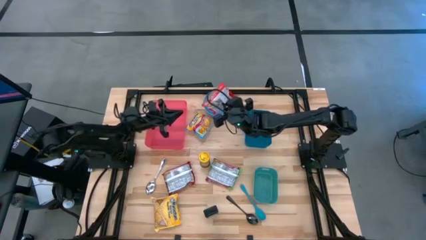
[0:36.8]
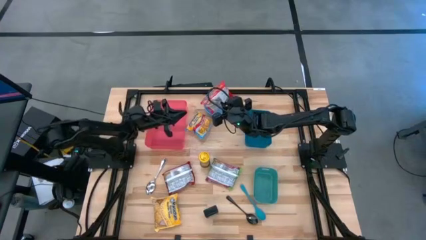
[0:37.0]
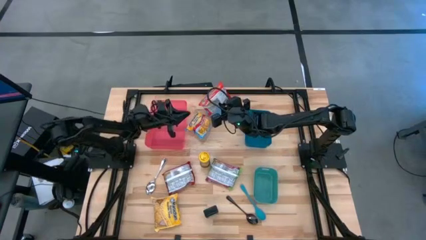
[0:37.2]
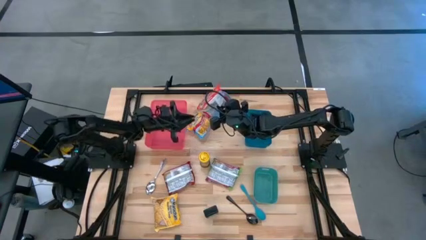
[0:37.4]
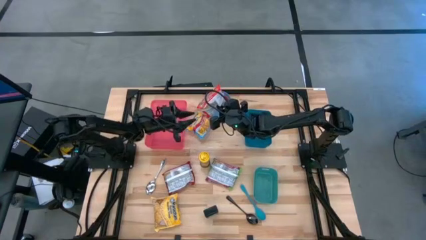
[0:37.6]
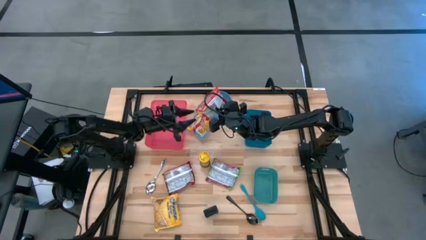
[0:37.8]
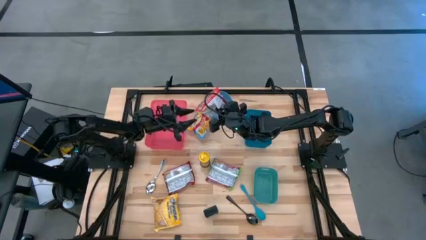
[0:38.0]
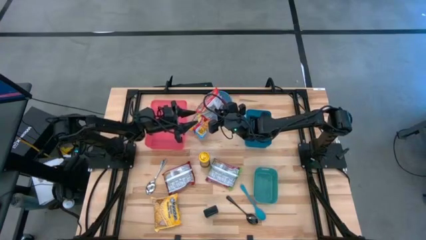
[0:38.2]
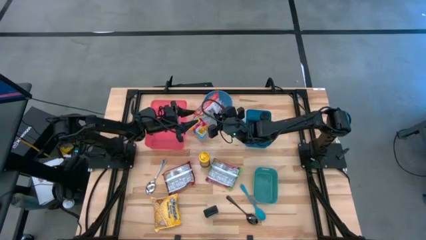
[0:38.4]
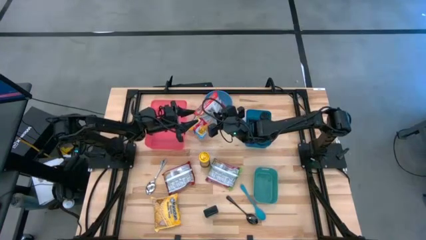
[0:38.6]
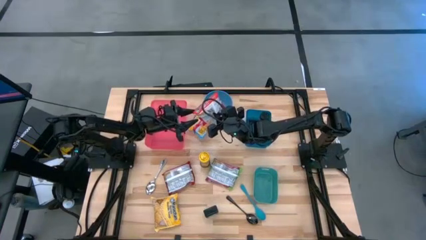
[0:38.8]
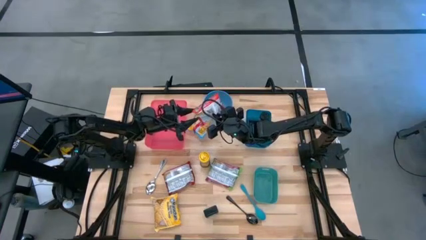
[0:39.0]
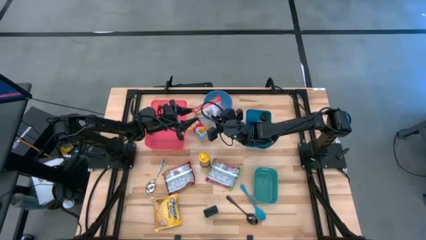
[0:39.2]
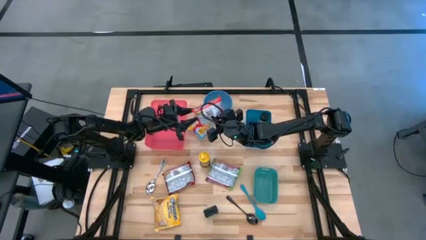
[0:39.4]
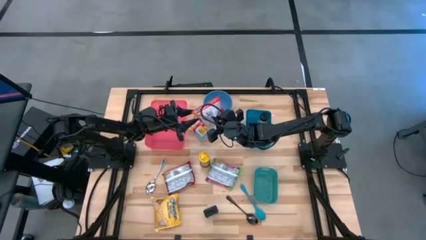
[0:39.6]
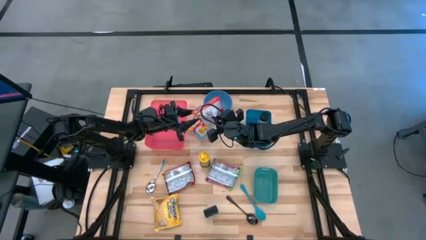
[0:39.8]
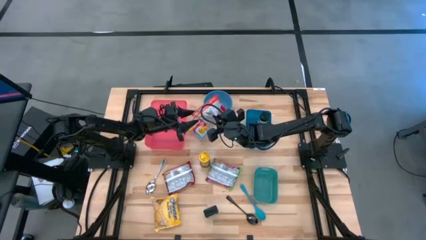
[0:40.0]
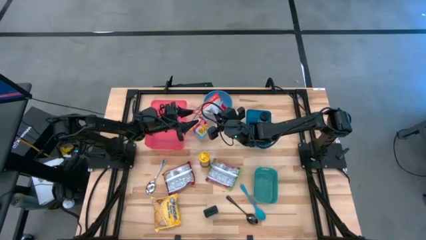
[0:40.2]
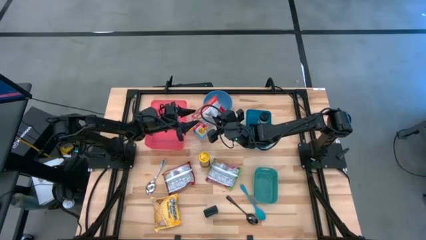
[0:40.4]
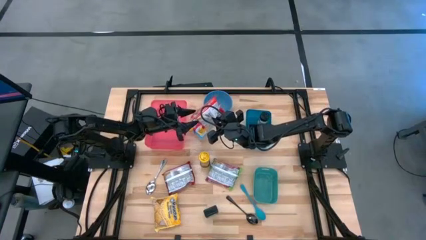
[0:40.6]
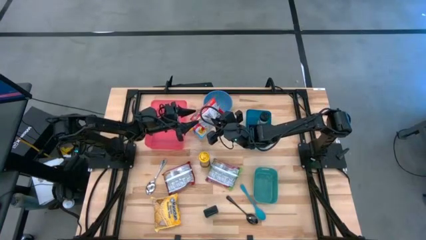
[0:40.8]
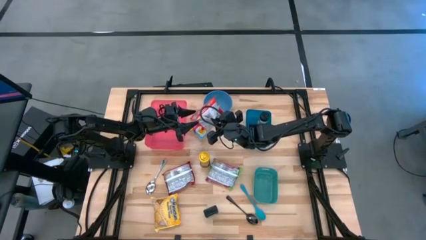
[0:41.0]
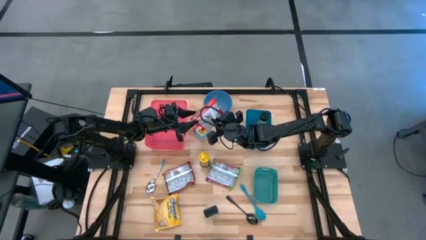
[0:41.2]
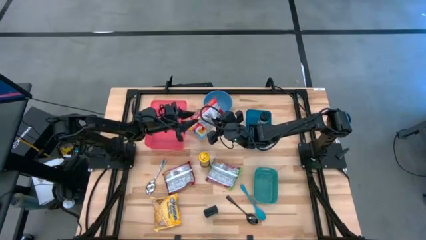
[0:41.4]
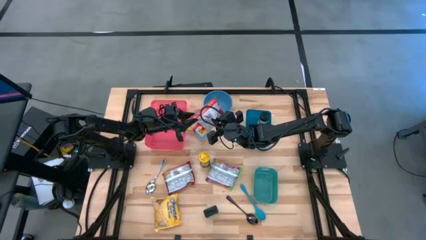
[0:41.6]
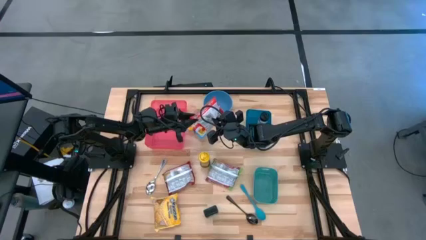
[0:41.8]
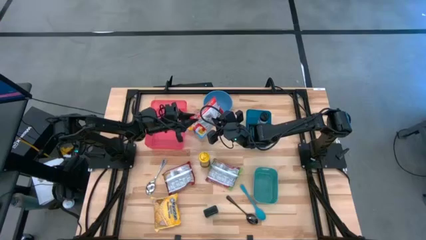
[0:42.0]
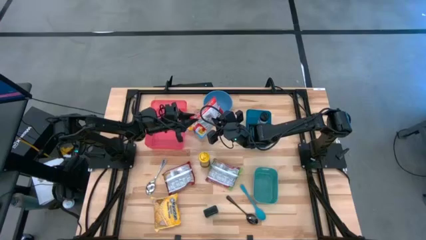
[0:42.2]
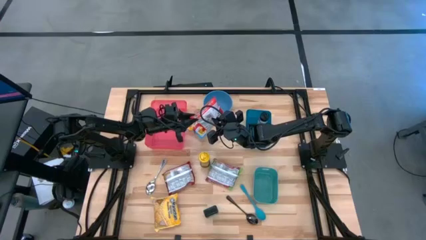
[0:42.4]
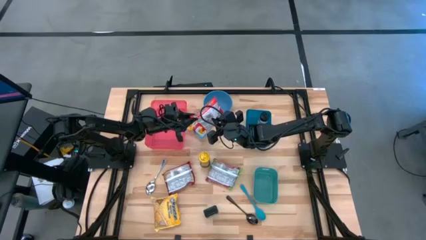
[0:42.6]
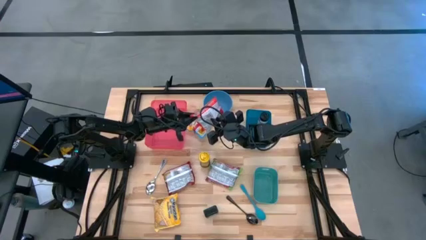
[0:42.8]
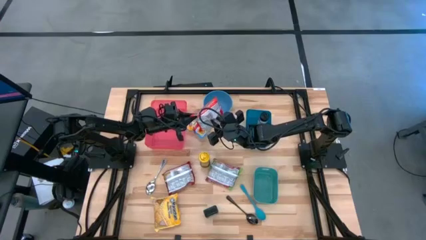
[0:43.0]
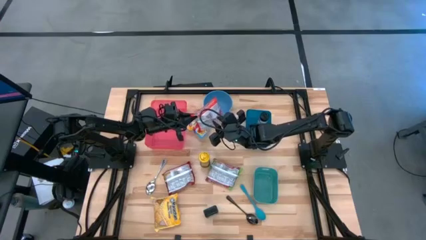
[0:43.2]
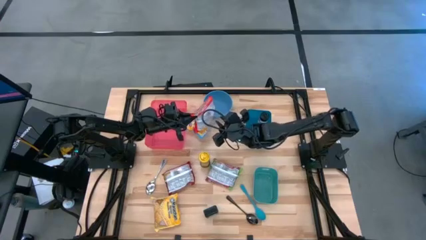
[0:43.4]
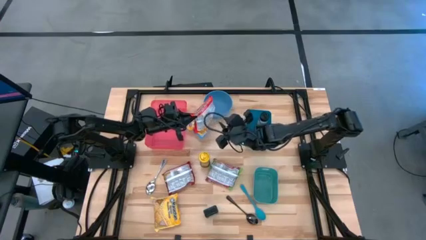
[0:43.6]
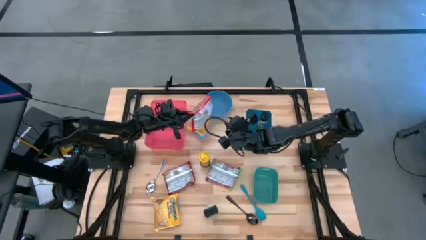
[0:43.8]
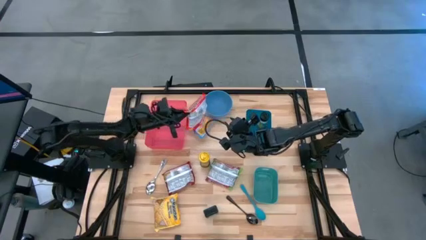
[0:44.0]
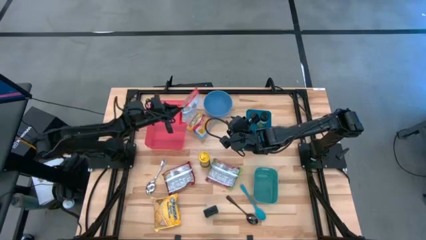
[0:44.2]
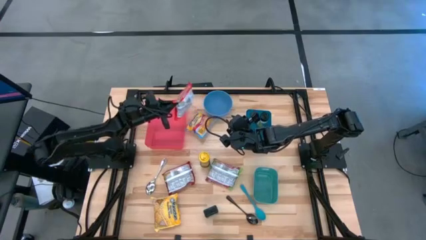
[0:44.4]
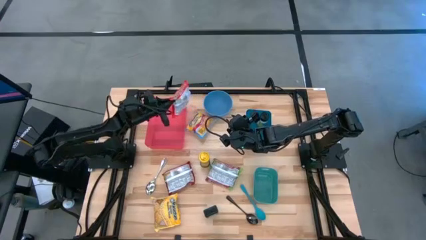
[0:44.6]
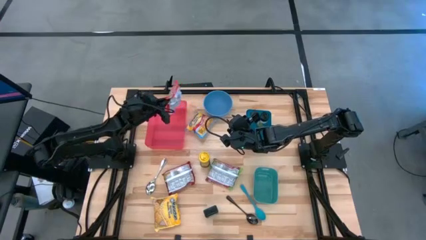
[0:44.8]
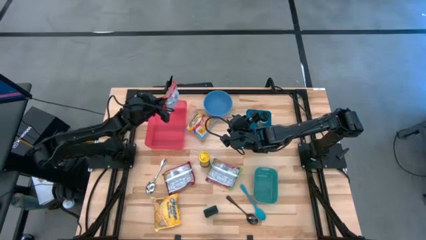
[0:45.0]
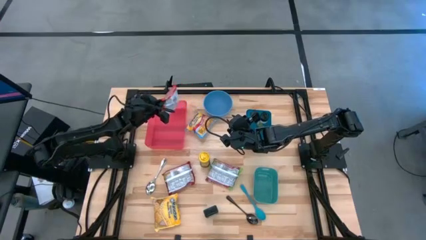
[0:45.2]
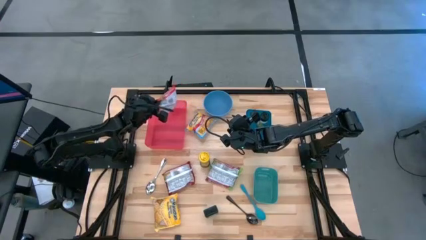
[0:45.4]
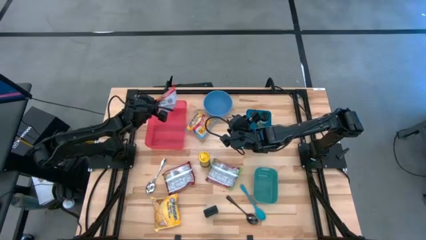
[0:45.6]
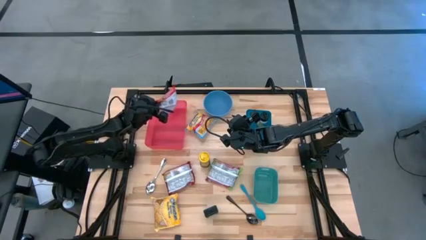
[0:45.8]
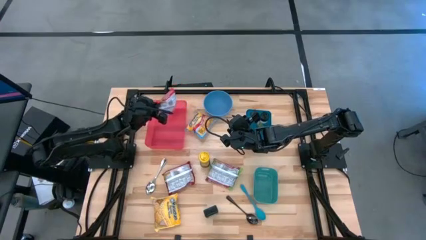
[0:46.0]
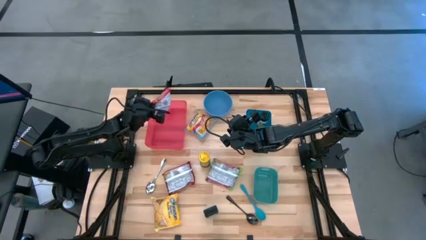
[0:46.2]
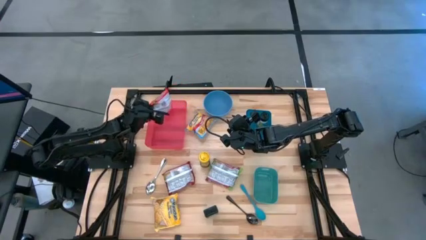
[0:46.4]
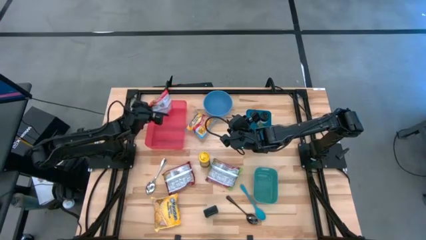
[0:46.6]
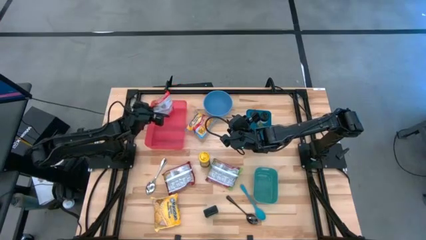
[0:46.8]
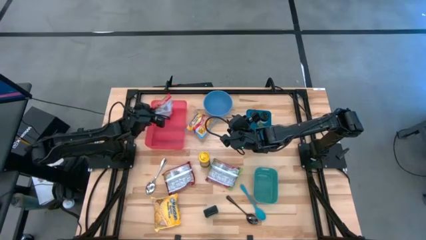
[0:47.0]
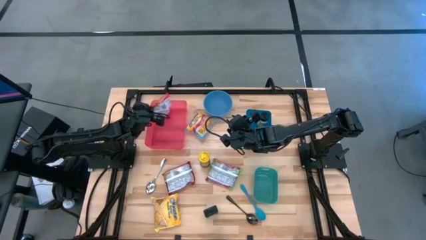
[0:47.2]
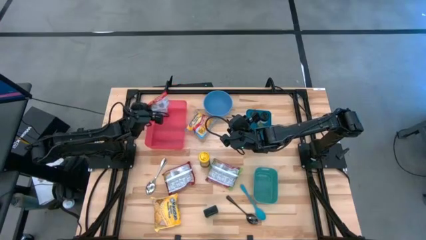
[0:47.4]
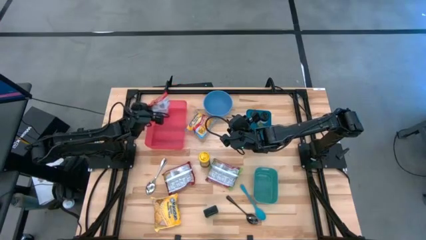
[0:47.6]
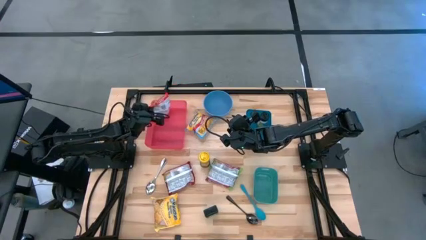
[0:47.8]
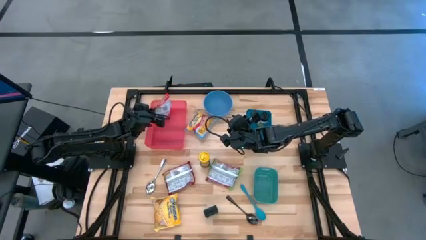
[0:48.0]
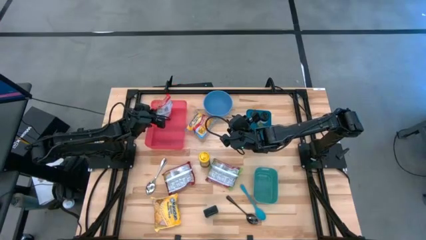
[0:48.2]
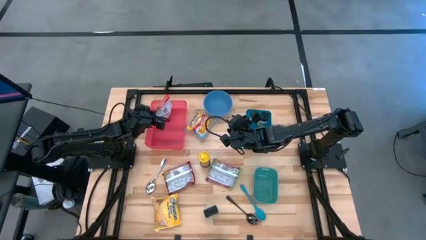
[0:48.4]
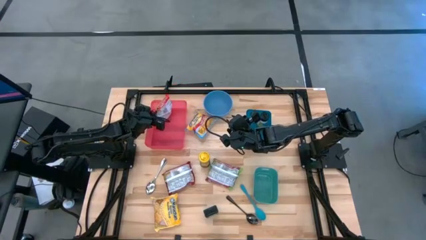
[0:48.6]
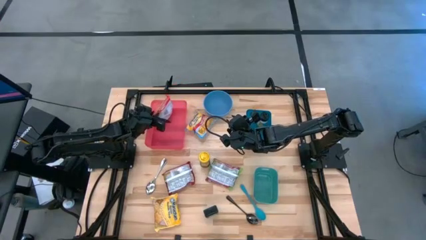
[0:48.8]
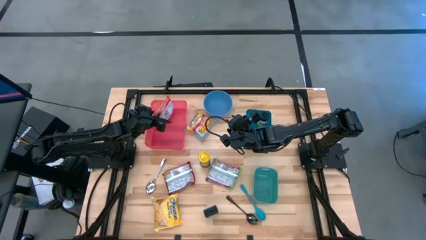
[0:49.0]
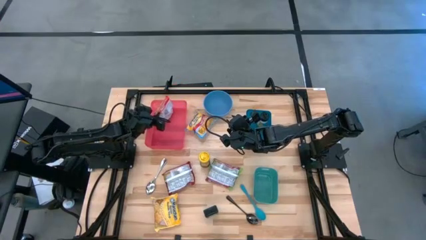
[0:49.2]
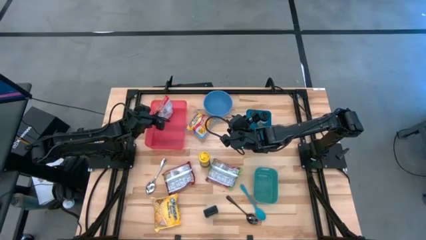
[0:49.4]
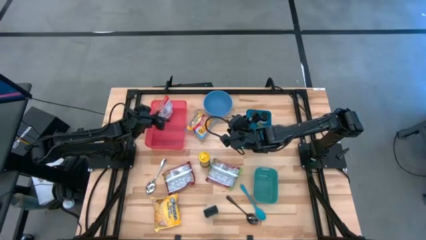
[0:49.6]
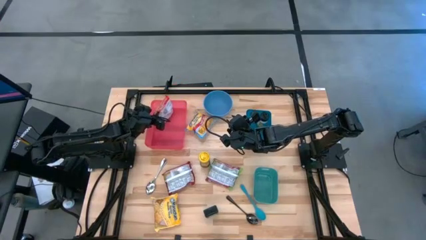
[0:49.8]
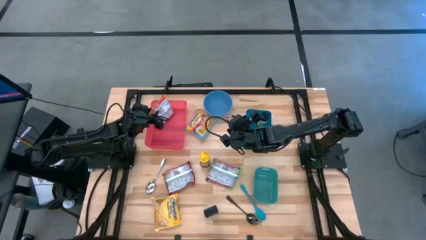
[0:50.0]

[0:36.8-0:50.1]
Task: Pick & Place Food Item
Put the orange noodle pack into the red bin

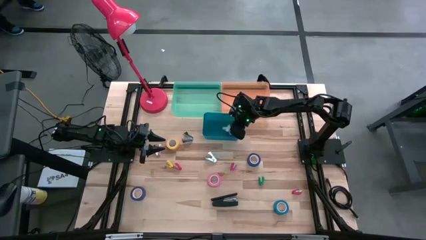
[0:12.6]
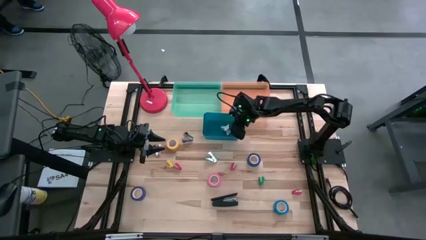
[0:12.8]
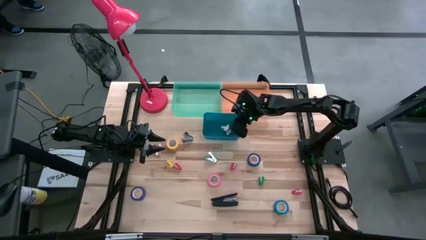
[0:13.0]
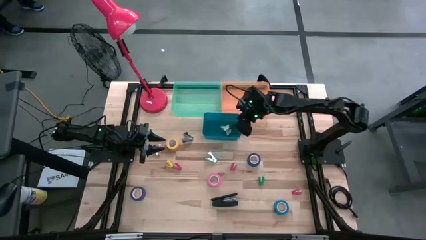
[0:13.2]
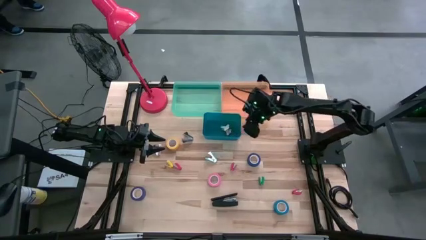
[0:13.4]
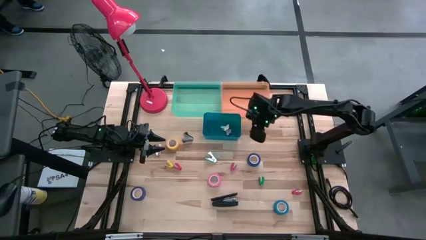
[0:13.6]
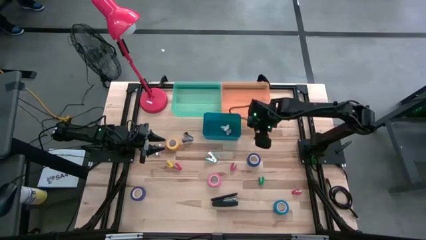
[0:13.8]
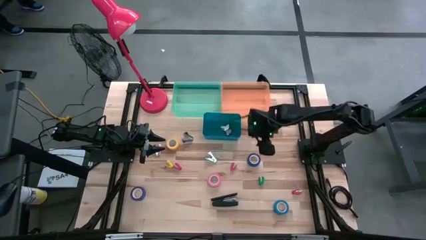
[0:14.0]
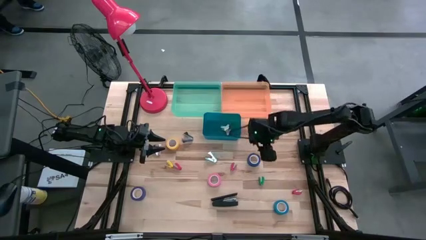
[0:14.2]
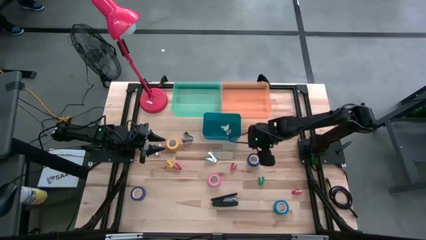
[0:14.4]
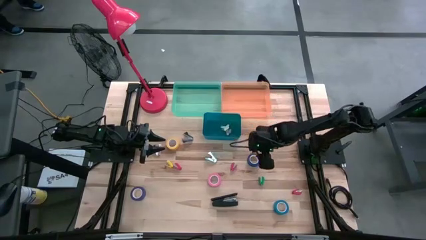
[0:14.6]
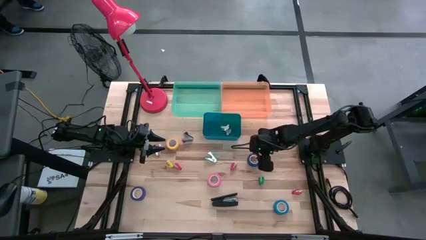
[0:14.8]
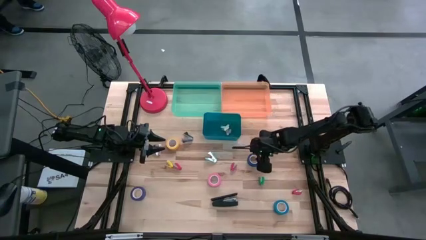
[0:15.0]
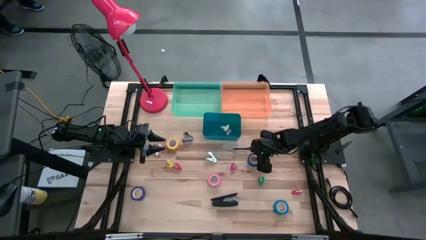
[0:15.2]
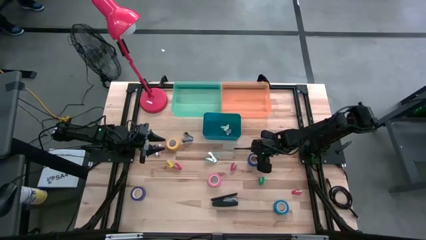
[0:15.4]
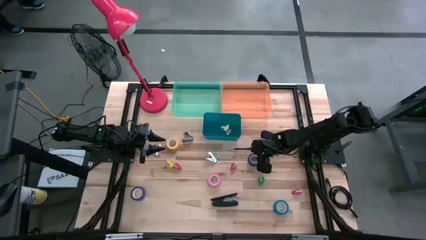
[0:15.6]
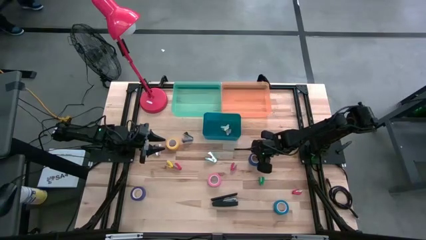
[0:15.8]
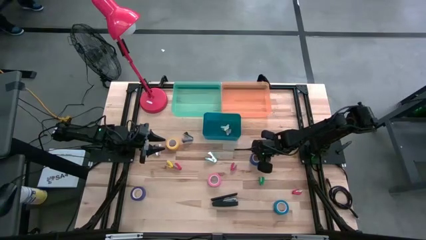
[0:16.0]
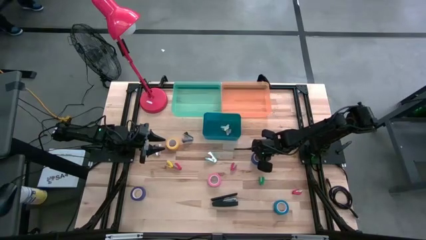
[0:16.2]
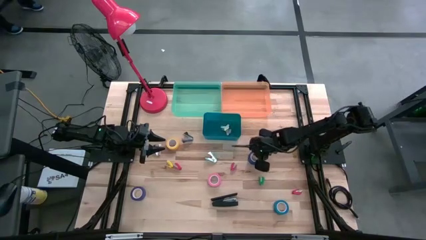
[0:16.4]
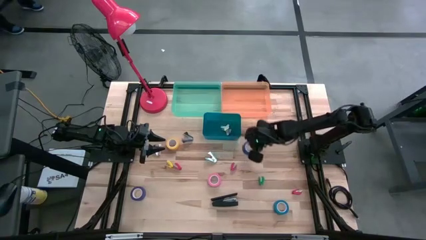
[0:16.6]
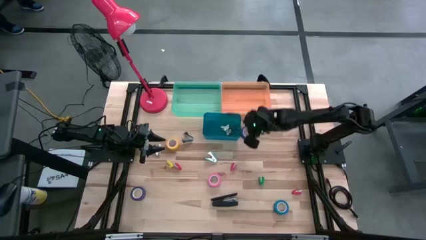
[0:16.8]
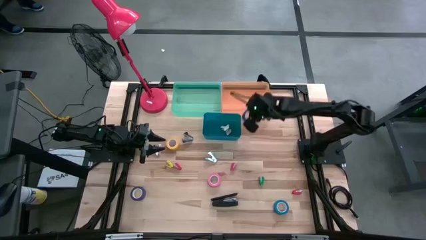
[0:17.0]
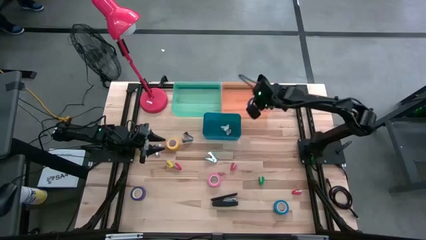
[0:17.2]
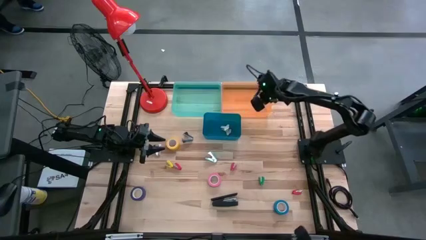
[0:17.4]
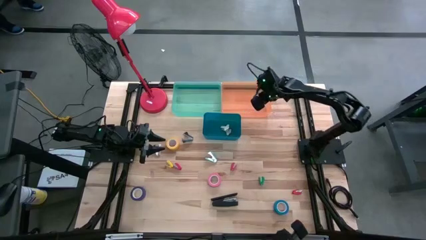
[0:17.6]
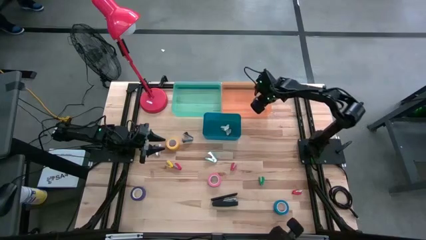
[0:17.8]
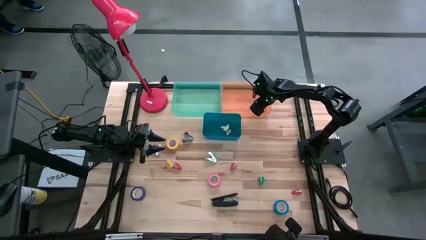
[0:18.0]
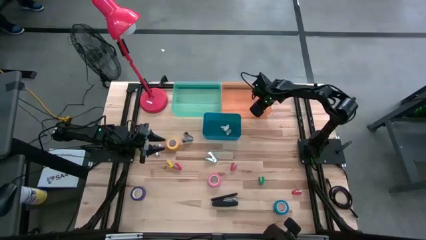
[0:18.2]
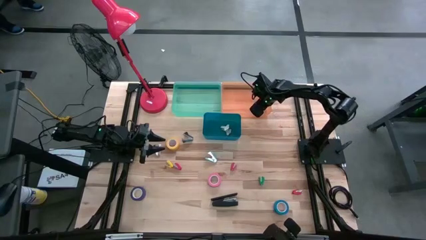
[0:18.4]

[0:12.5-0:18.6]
Task: Pick and place Stapler, Stapler remover, tape
Put the top blue tape into the orange bin
